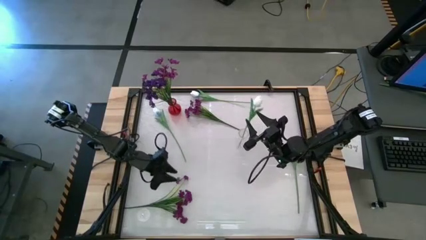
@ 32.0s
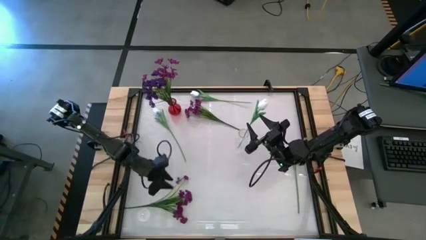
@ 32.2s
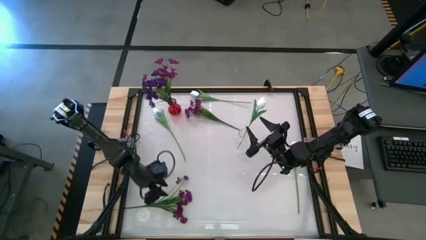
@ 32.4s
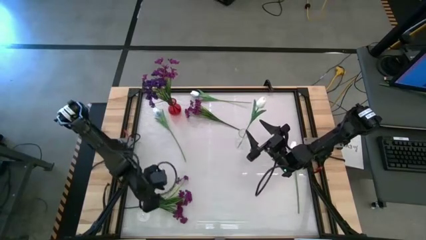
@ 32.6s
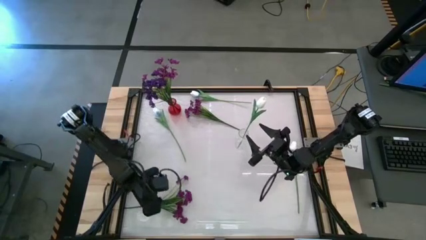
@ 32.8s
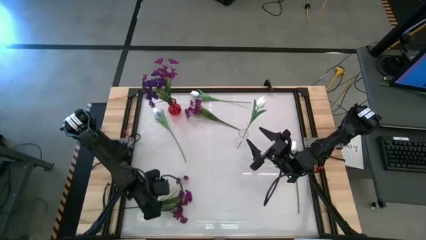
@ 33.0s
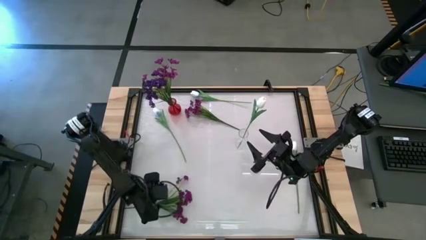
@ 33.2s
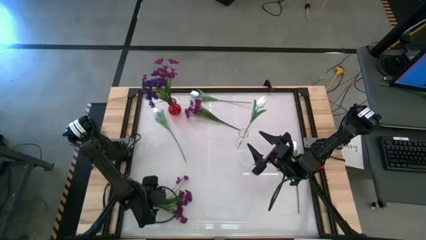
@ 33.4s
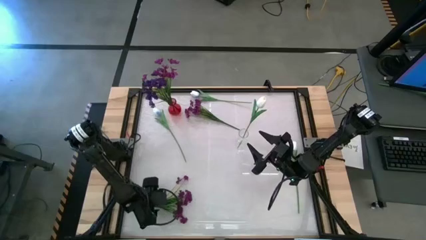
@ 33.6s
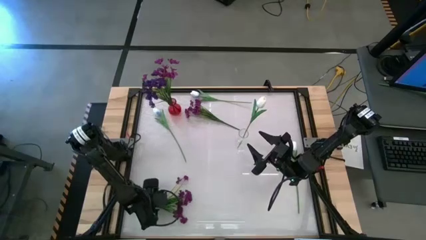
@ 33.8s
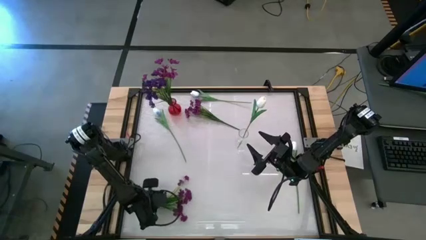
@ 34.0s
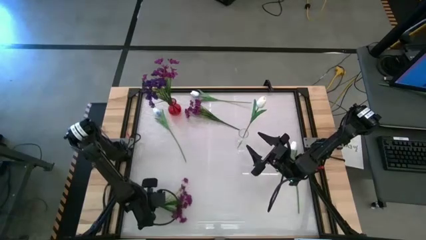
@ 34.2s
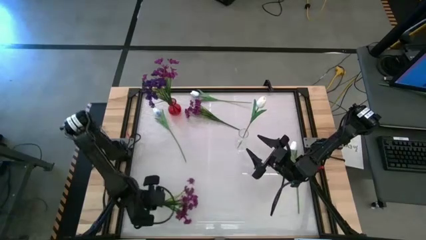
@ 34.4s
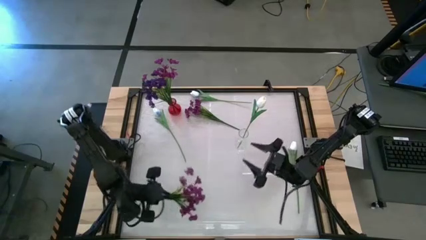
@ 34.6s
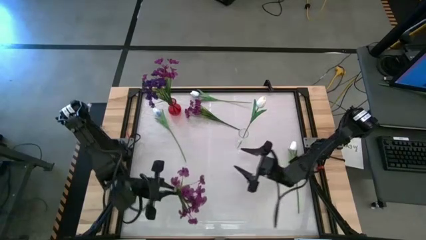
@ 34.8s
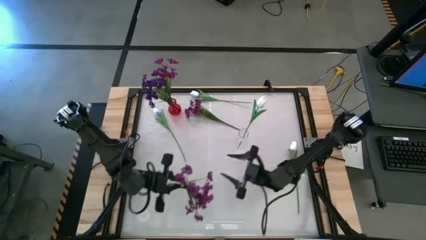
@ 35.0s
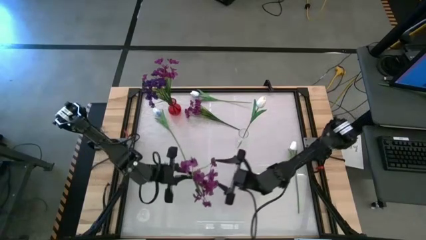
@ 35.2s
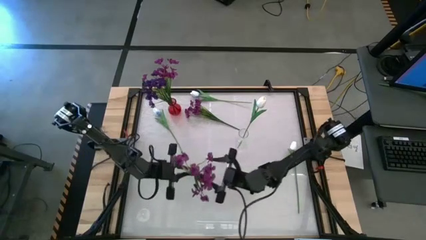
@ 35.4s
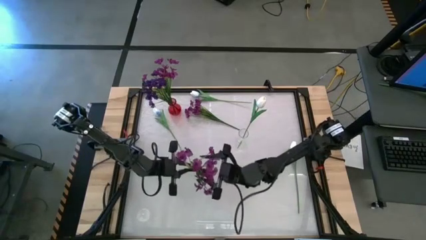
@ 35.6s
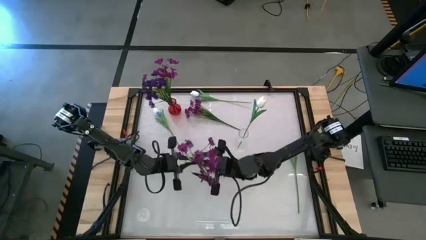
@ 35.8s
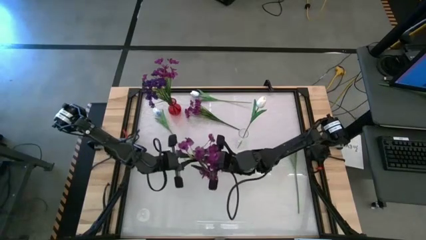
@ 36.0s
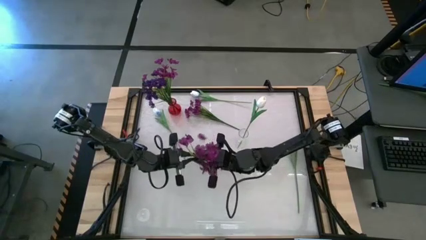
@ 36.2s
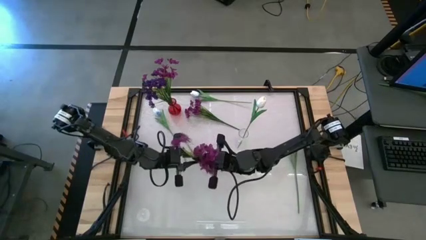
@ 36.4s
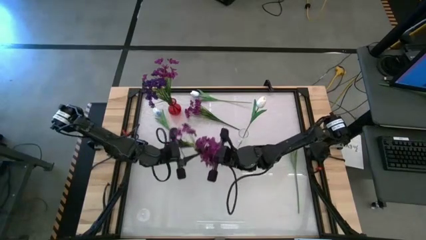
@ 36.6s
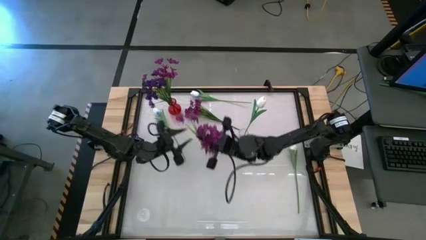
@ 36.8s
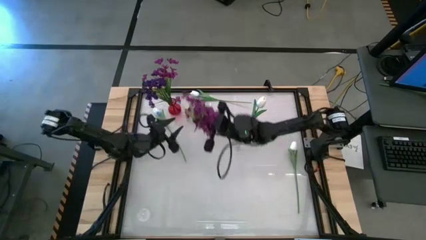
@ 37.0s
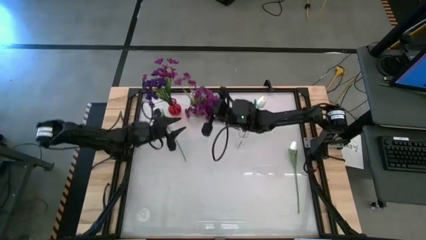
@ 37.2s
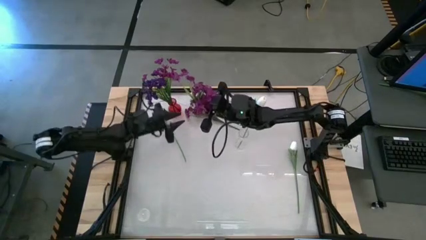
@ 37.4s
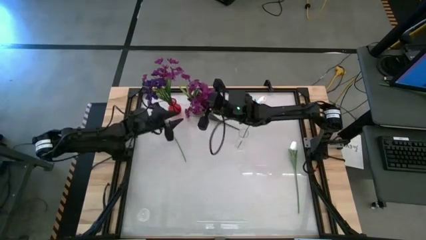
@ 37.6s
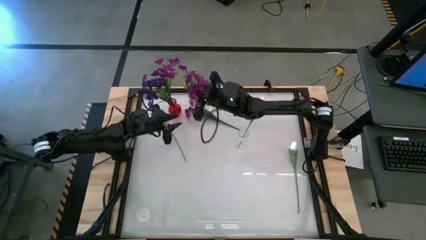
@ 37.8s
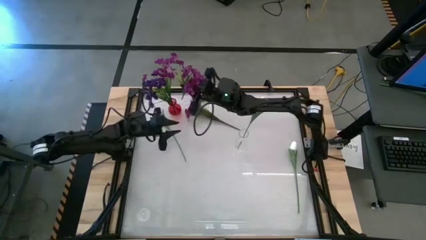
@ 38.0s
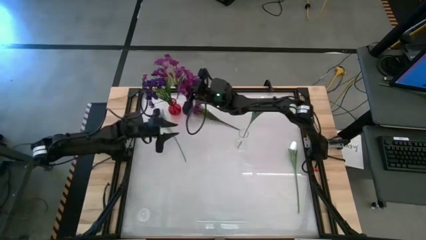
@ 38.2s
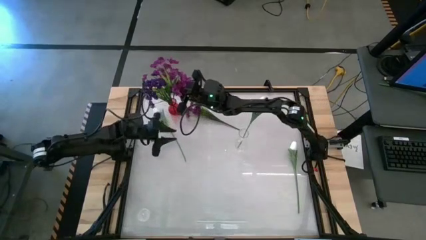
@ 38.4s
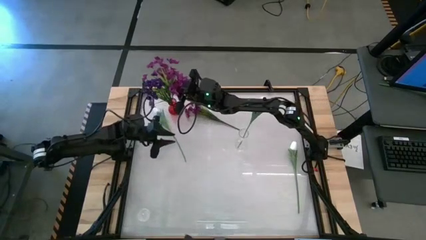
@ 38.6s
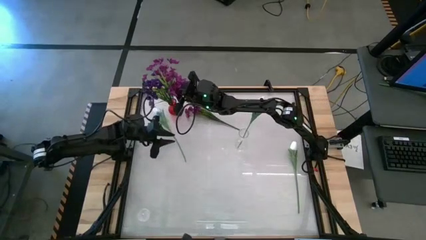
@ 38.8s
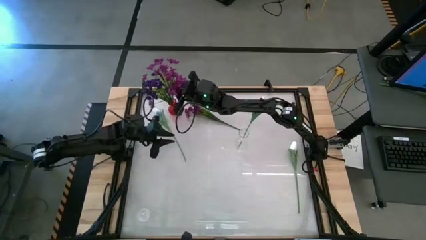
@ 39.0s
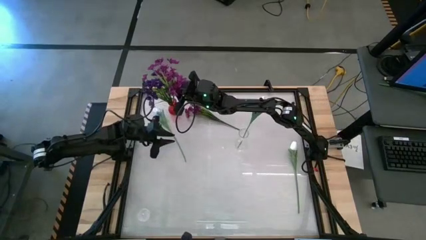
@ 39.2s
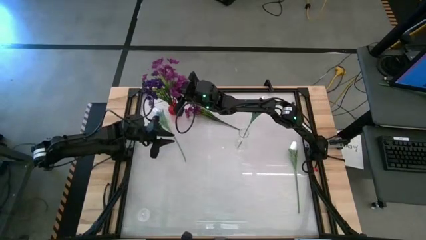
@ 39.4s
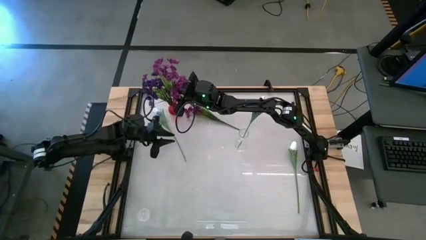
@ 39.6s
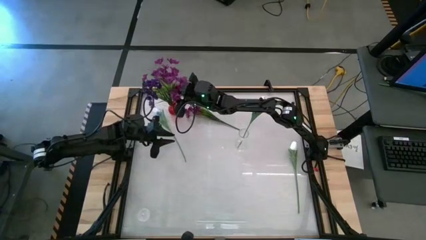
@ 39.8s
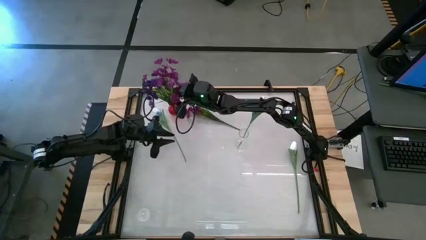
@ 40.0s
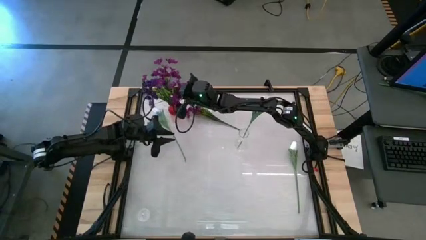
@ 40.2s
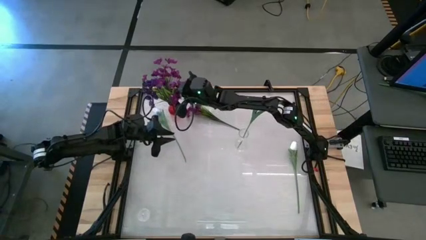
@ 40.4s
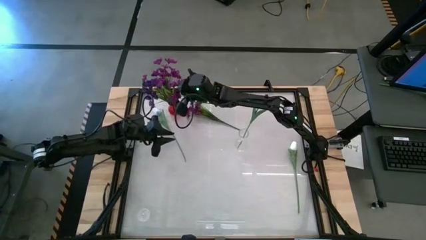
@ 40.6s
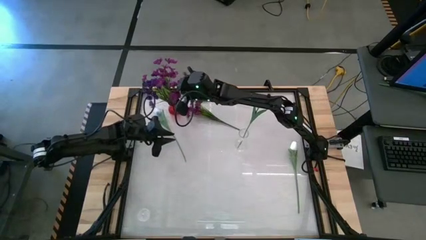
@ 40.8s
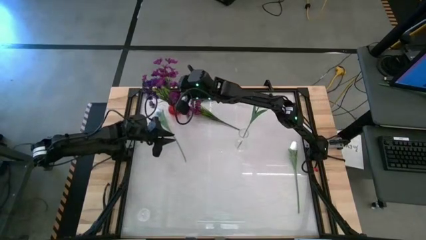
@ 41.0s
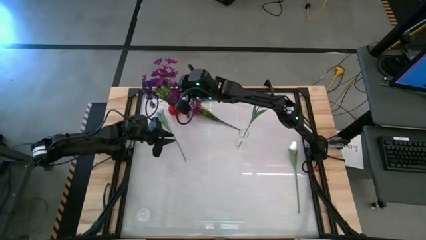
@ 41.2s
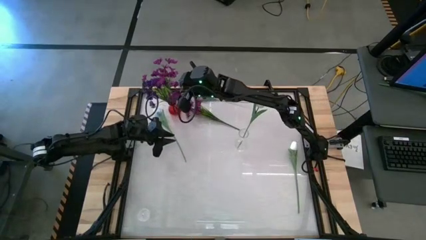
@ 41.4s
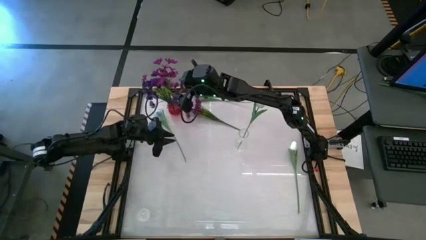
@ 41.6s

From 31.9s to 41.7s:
Task: Sort flowers into vase by color
Put the light purple flowers into the red vase

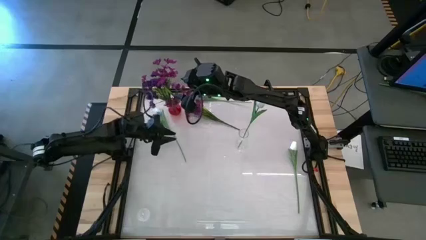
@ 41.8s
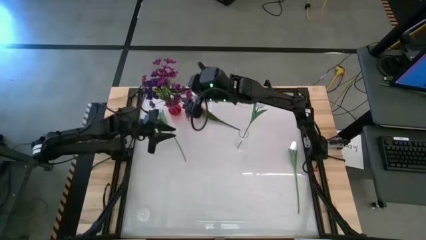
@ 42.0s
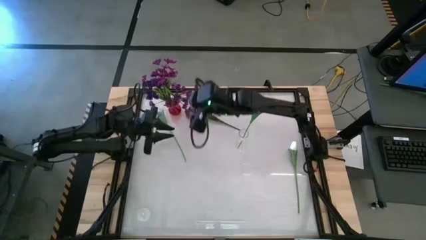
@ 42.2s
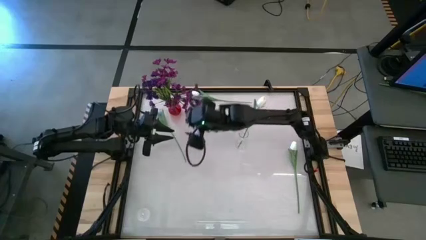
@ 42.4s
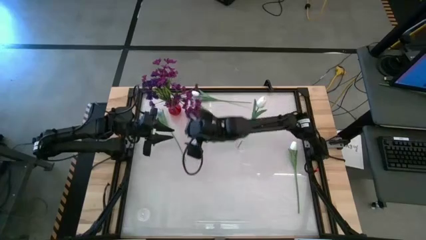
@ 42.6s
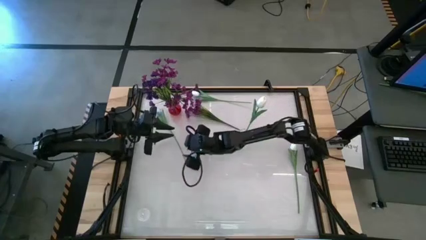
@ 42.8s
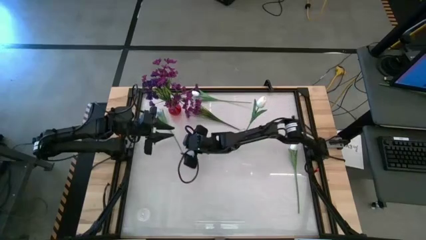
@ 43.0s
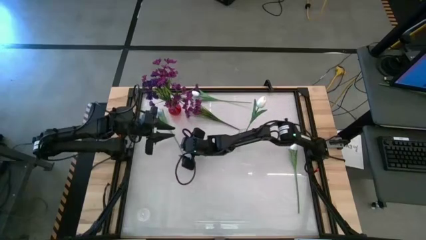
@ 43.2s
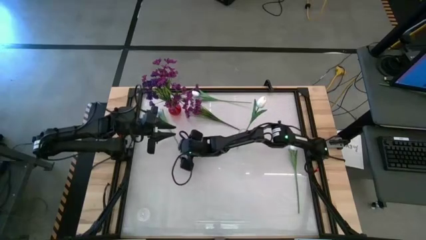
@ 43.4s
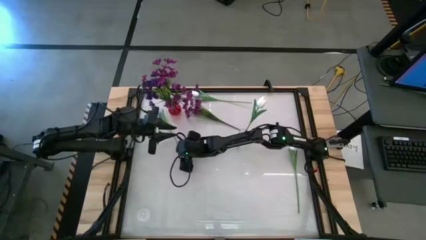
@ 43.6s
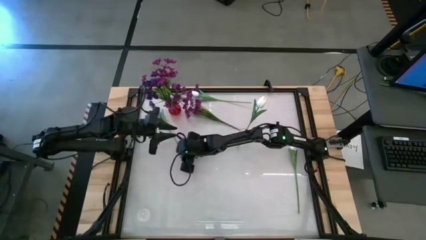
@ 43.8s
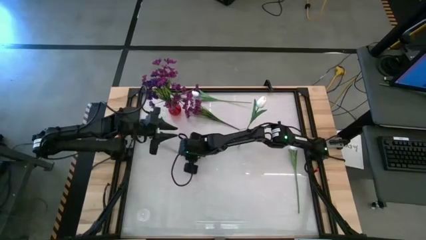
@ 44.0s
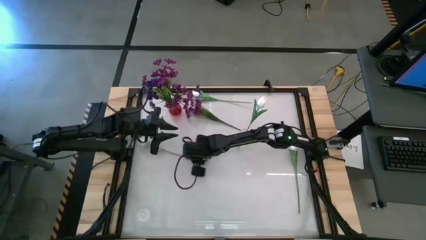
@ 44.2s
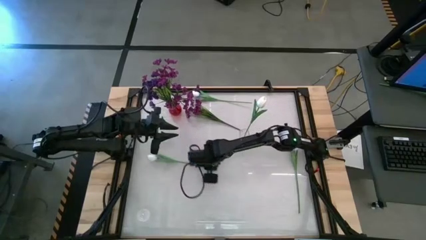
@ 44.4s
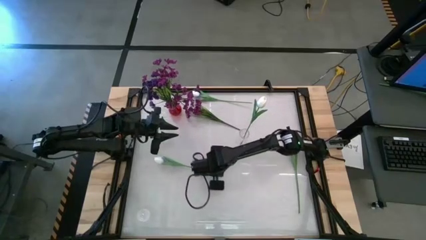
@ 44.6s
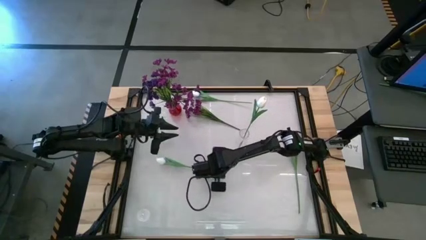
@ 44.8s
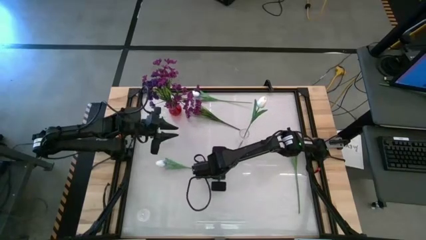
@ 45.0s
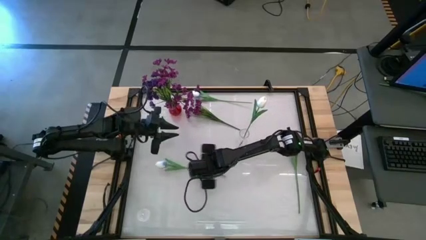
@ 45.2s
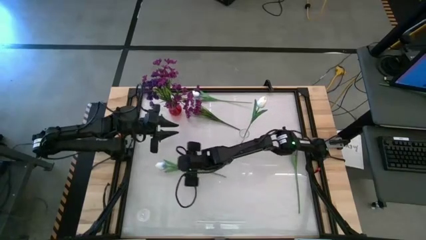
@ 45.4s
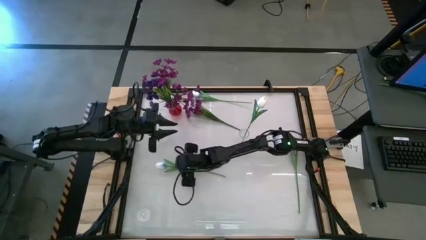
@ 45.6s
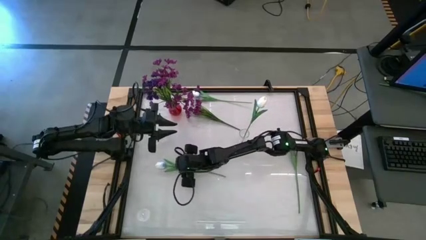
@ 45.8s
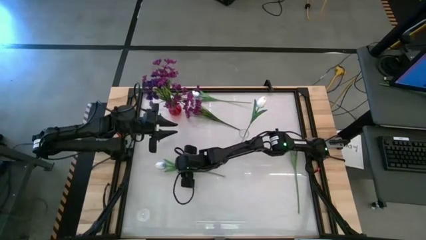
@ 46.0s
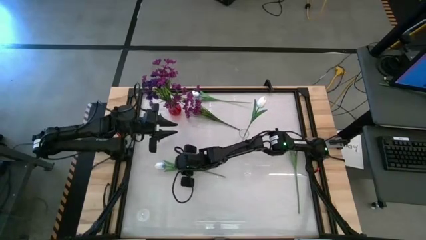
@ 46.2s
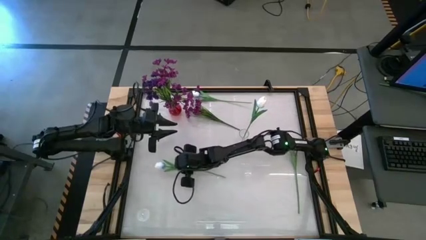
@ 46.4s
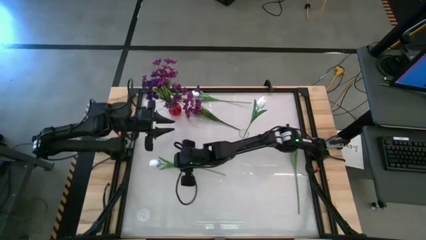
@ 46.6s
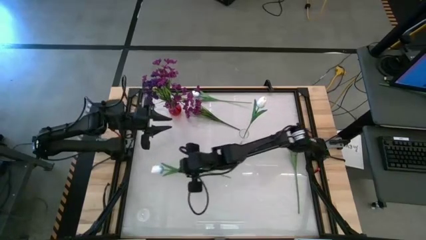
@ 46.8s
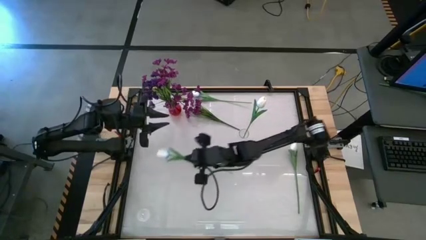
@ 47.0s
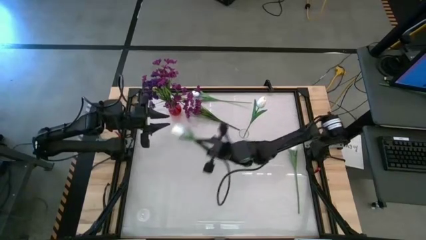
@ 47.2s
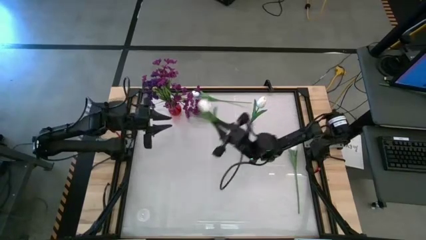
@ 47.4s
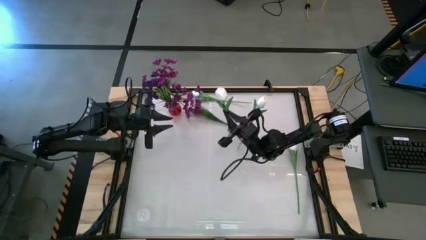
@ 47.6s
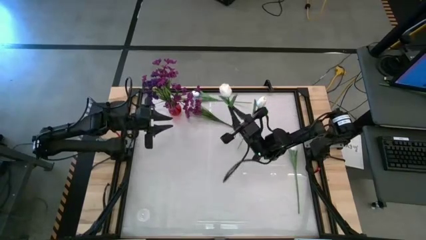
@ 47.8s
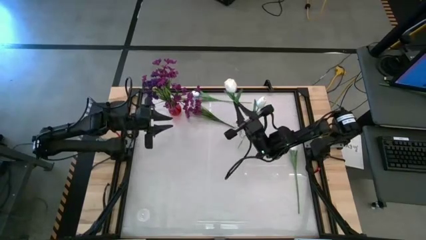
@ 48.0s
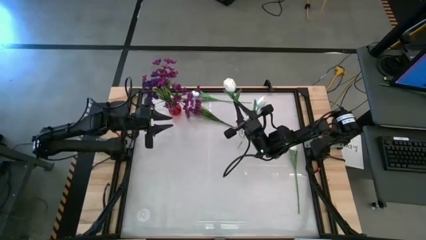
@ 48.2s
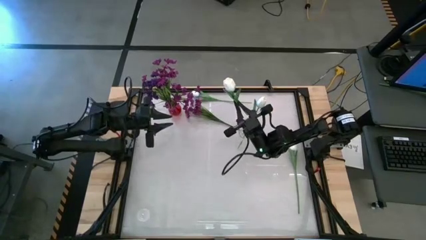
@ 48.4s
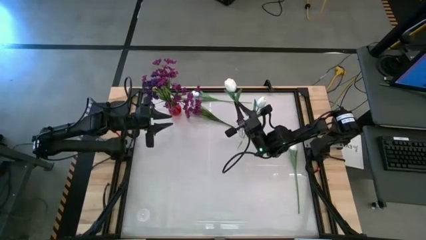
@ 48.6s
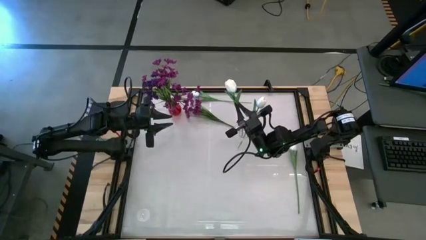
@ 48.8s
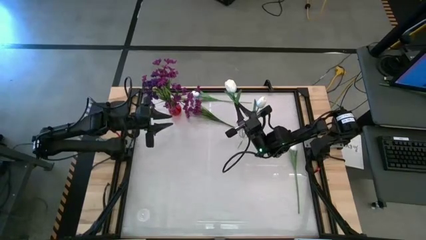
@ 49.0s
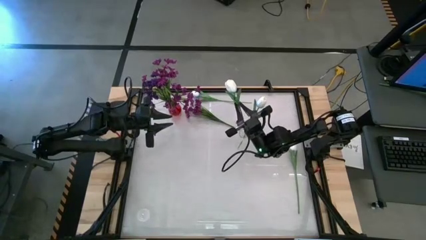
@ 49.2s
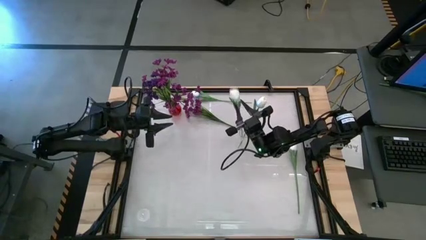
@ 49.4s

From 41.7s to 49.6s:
Put the white flower into the transparent vase
